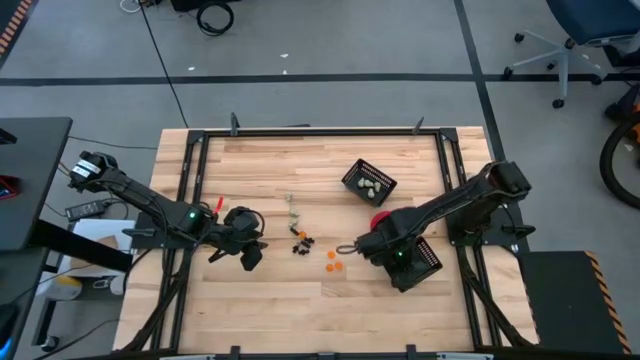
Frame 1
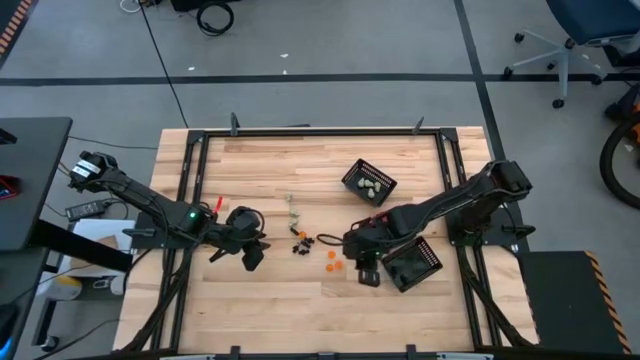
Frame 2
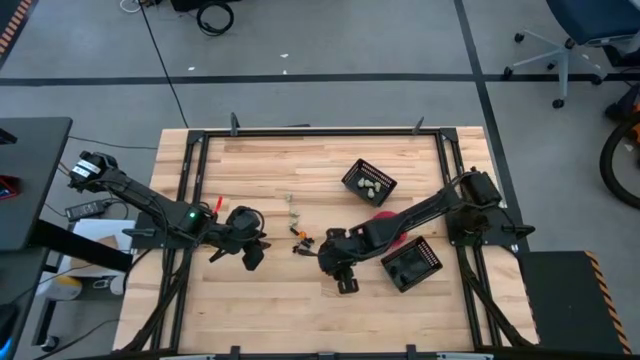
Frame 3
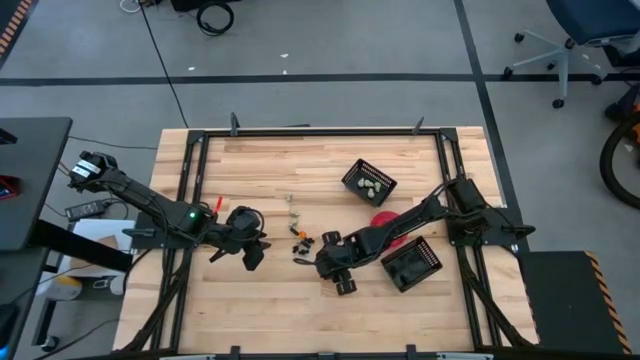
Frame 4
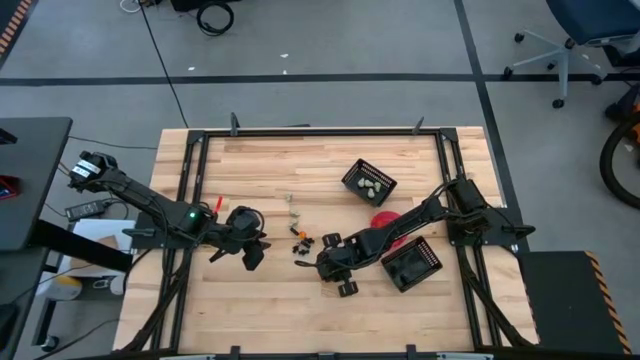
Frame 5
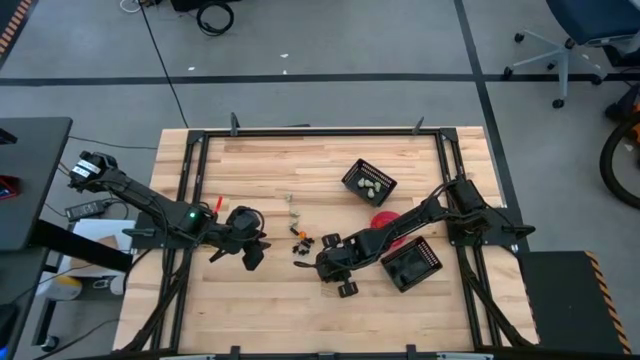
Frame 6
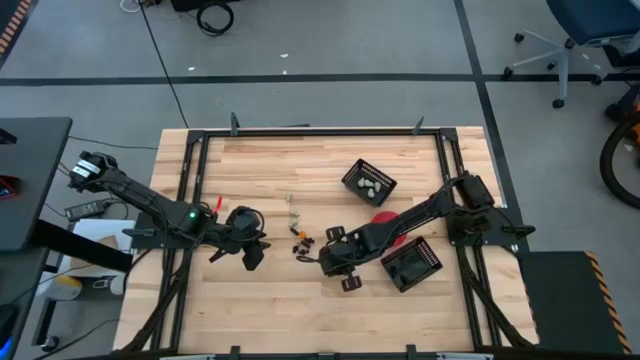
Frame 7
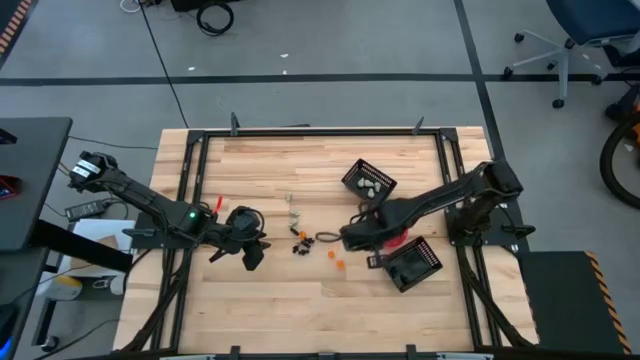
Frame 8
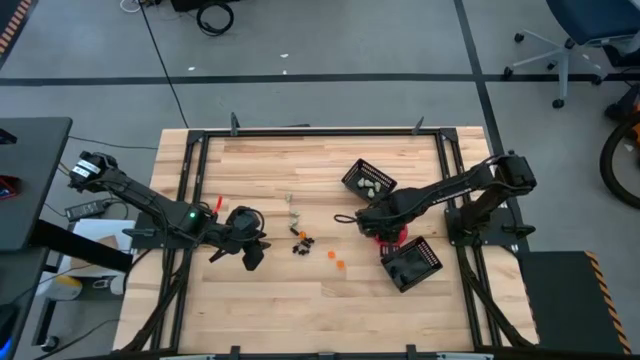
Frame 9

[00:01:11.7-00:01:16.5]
Task: Sort Halloween decoration
Put the orange pumpkin toy into the red bowl

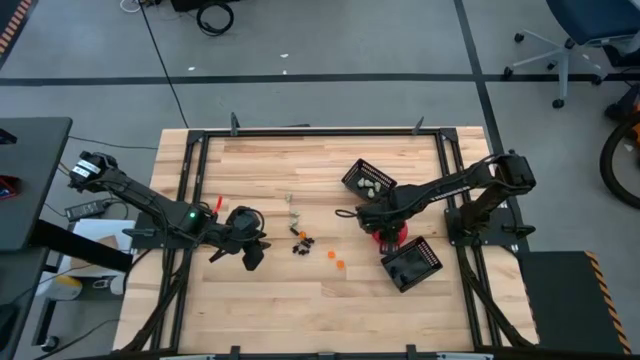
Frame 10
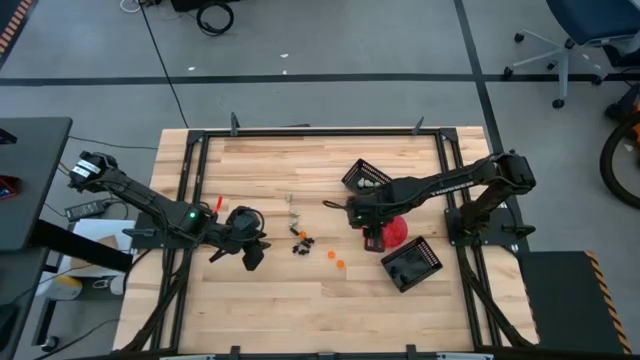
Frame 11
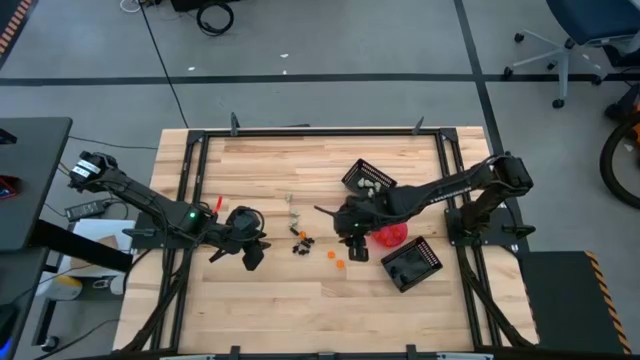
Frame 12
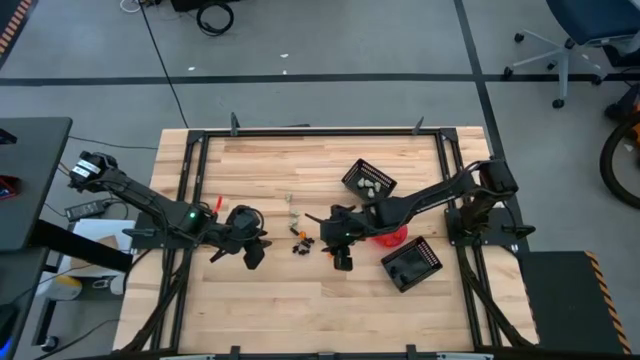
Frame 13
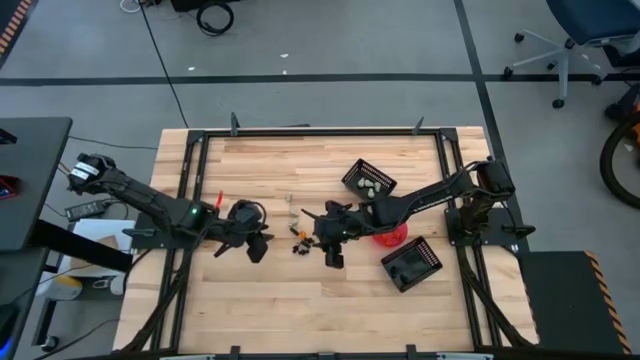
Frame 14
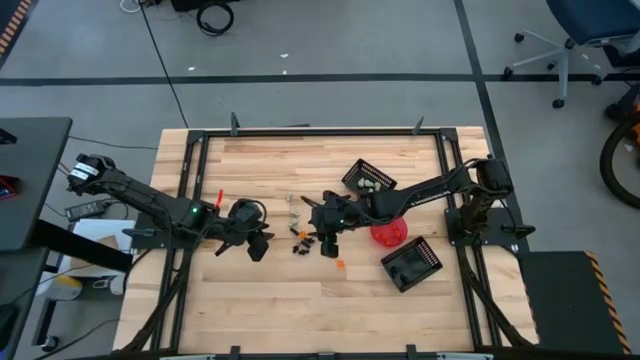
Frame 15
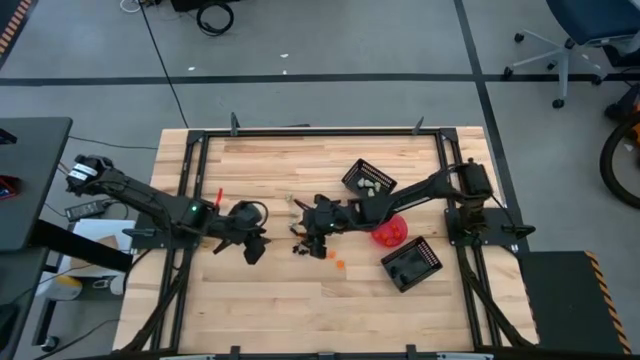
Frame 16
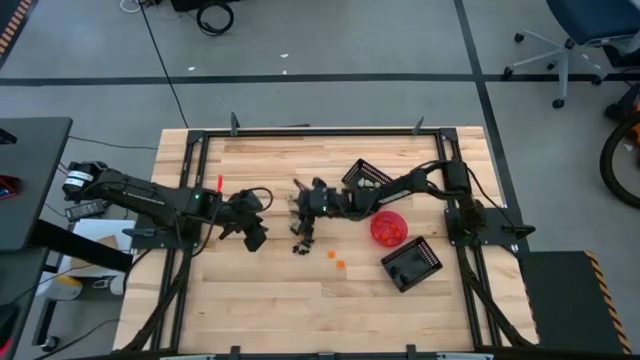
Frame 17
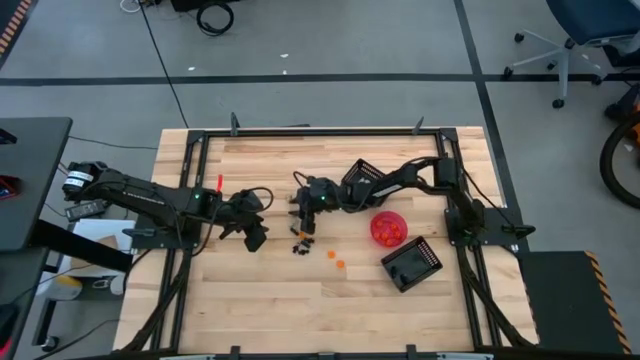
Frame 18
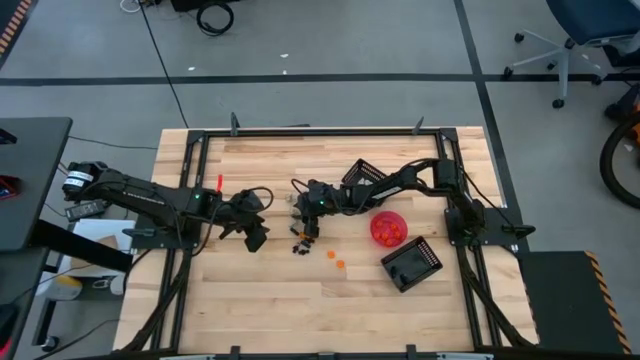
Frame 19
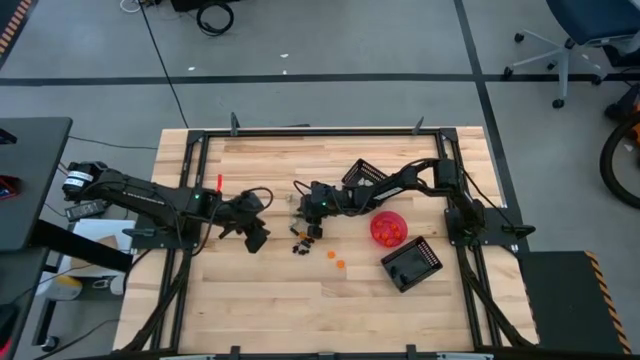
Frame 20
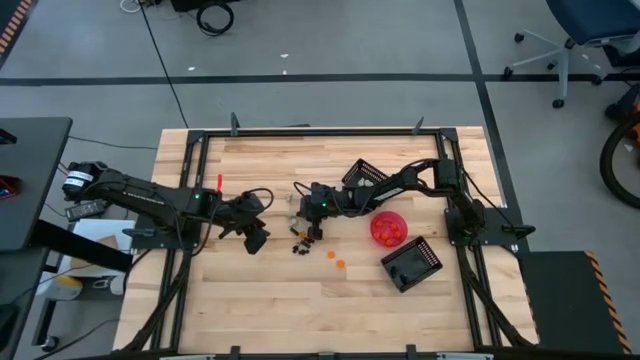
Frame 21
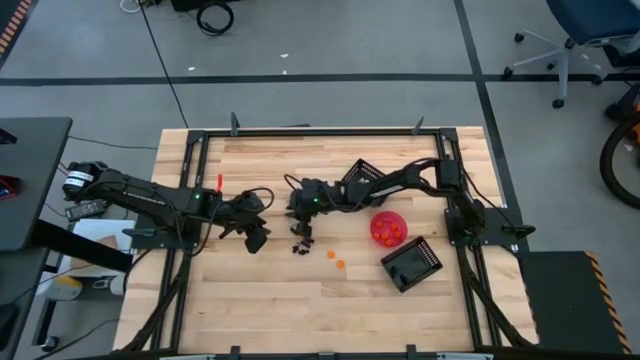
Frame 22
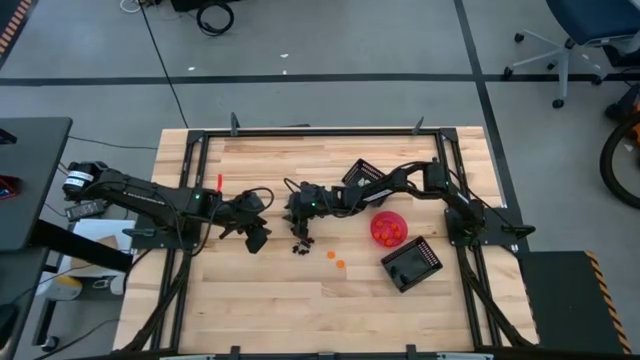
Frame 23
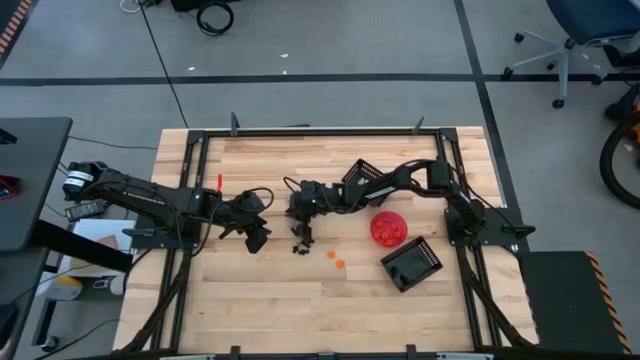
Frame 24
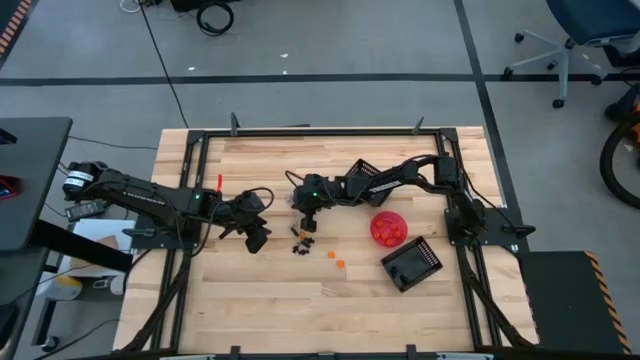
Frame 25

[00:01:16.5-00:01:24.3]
Put the white skull toy into the top black basket

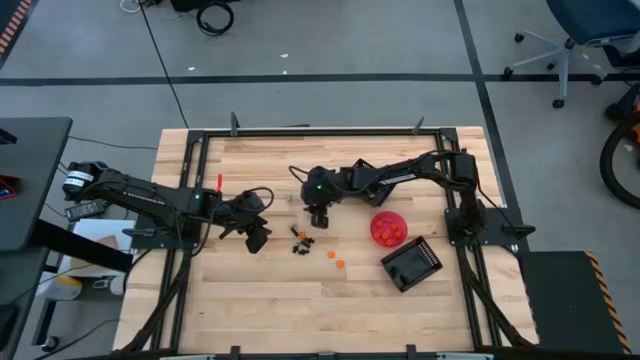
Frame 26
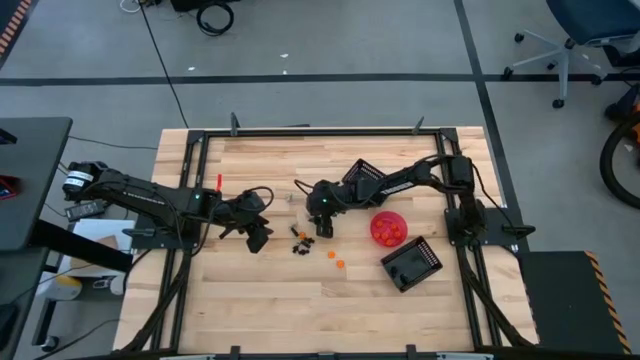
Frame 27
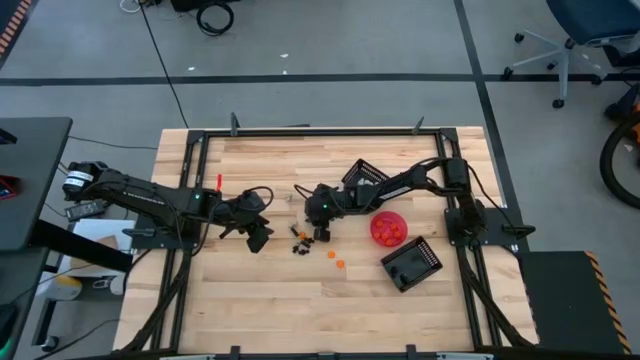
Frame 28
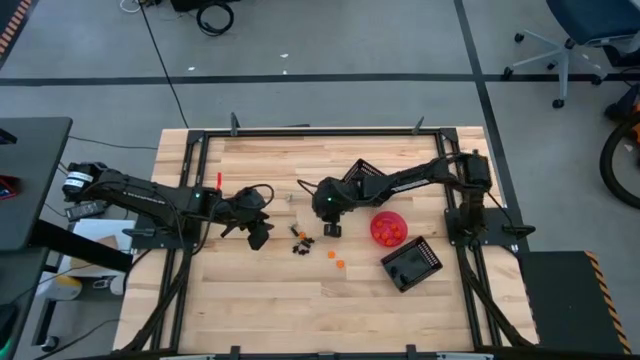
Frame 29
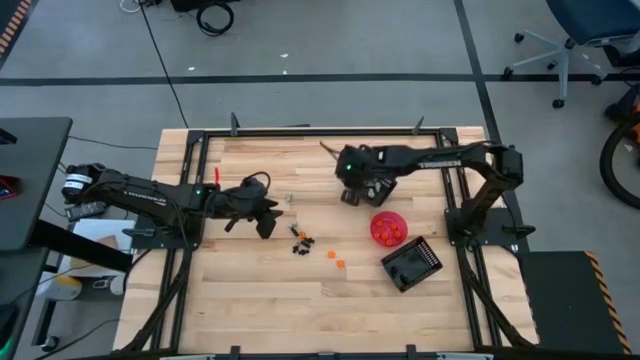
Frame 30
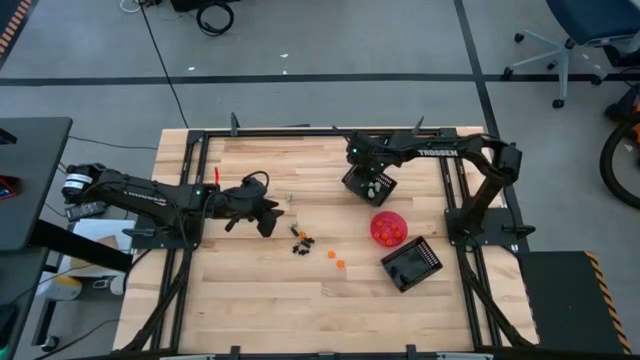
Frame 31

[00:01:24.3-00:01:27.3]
Put the white skull toy into the top black basket

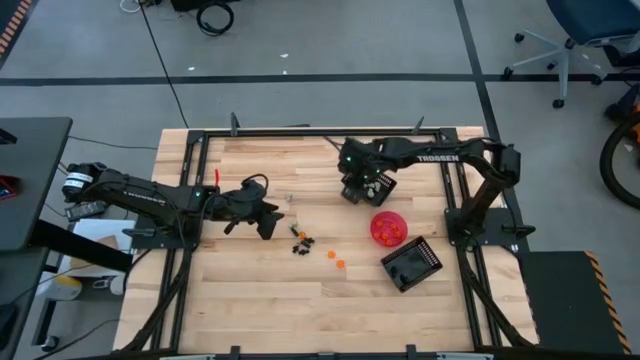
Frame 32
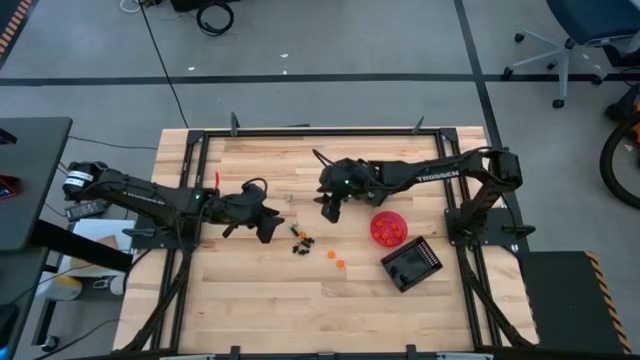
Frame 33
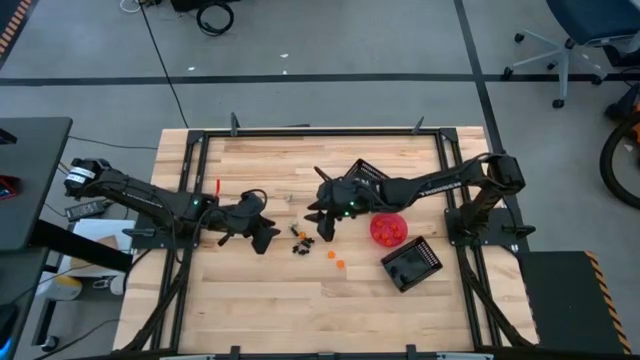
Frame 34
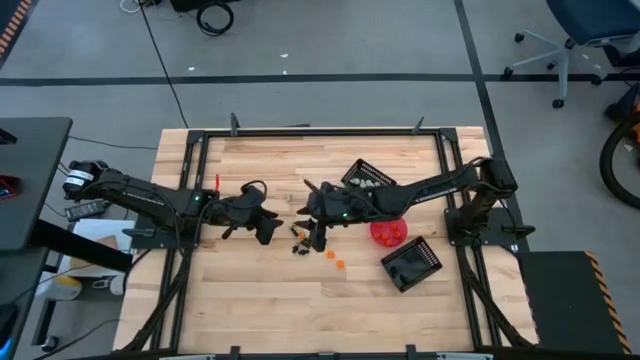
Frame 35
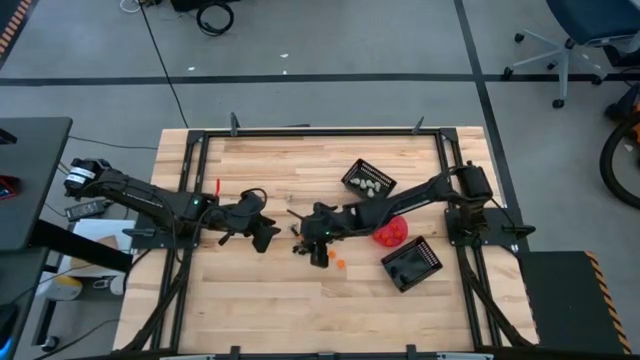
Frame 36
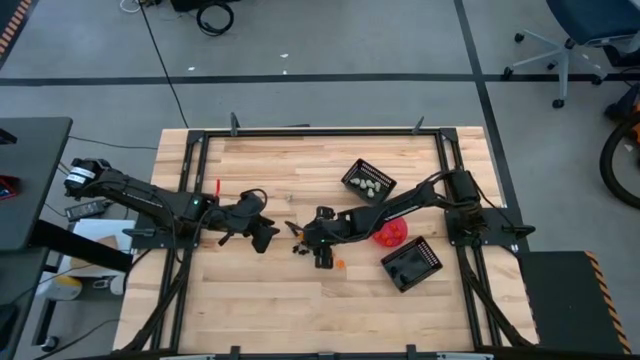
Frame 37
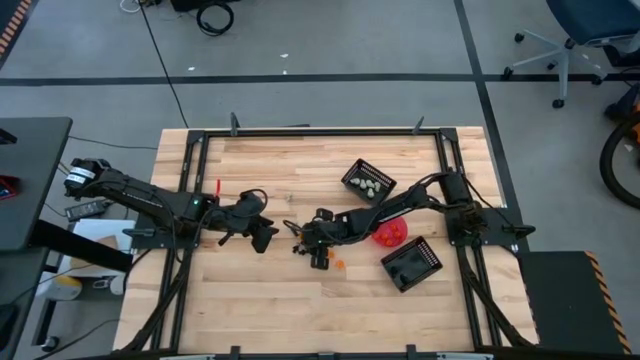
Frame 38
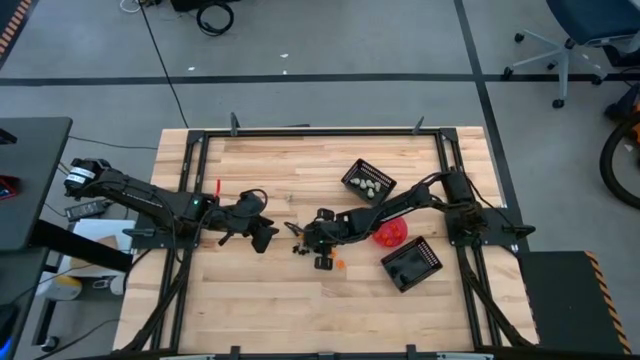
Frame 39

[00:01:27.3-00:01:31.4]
Put the black skeleton toy into the bottom black basket

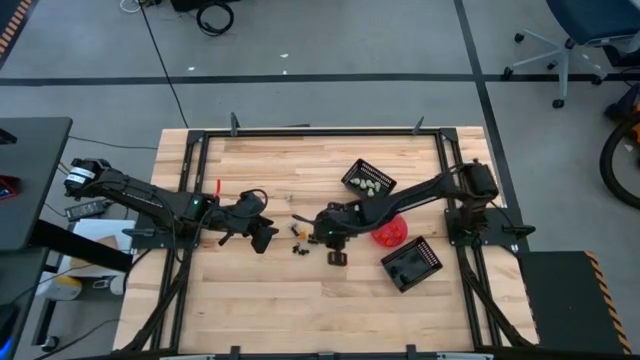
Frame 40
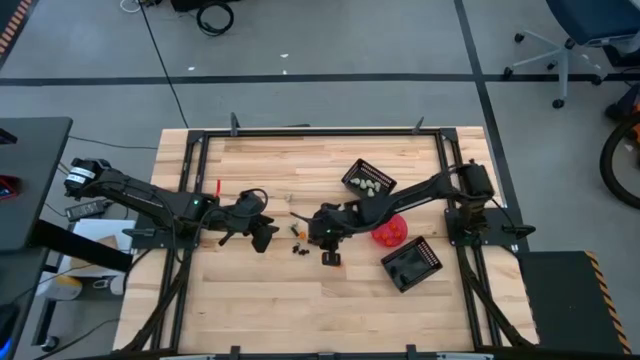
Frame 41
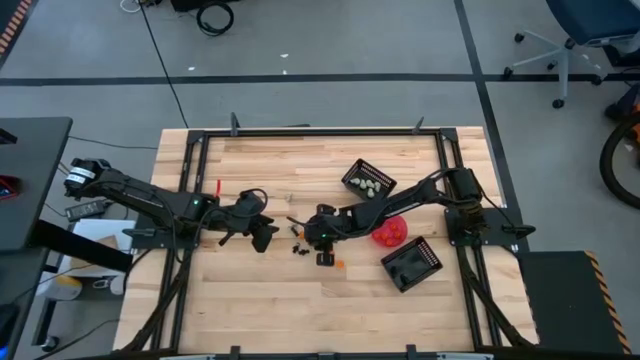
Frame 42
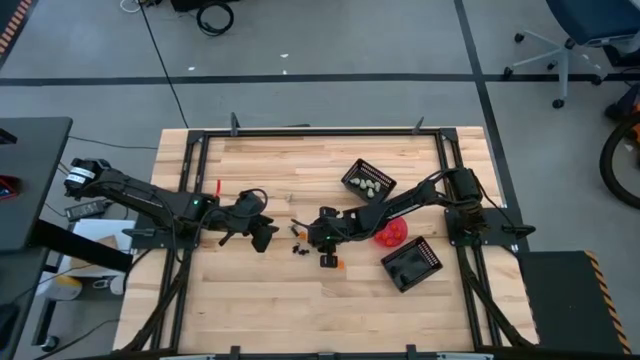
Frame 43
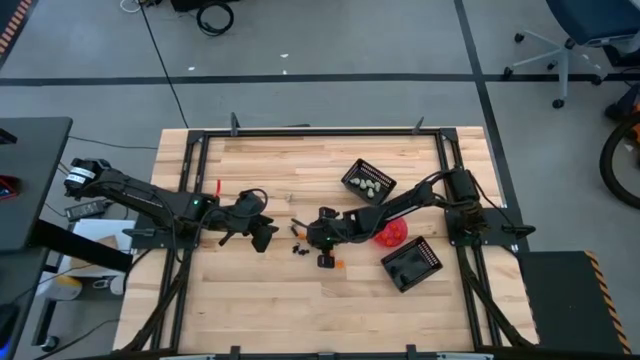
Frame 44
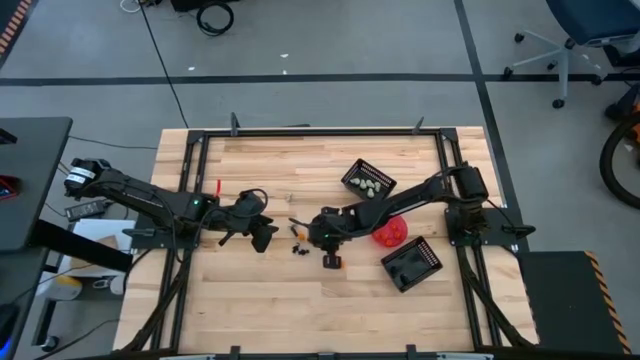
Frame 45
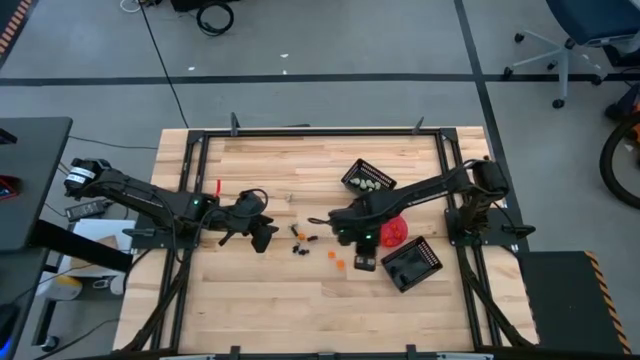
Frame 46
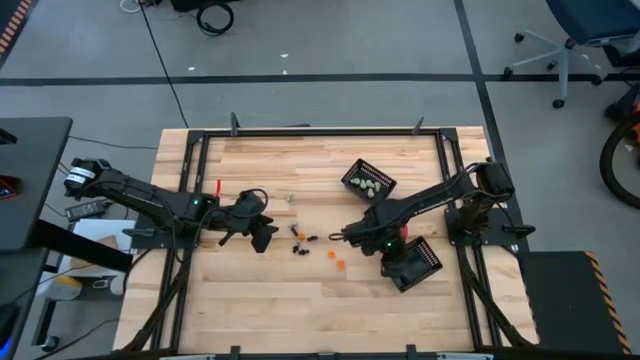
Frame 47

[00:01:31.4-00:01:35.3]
Put the black skeleton toy into the bottom black basket
